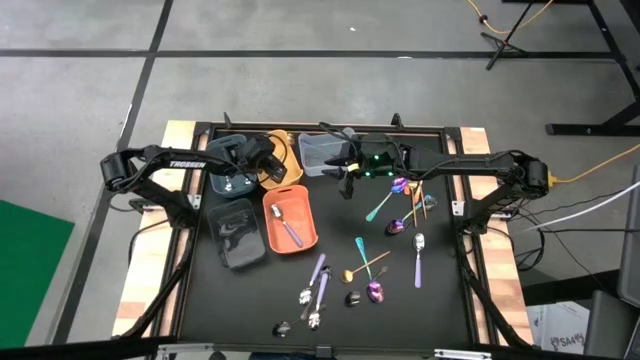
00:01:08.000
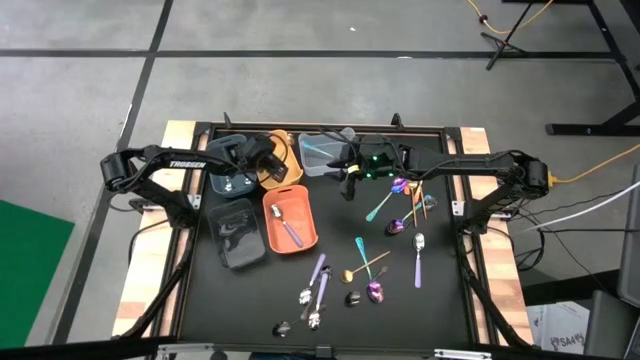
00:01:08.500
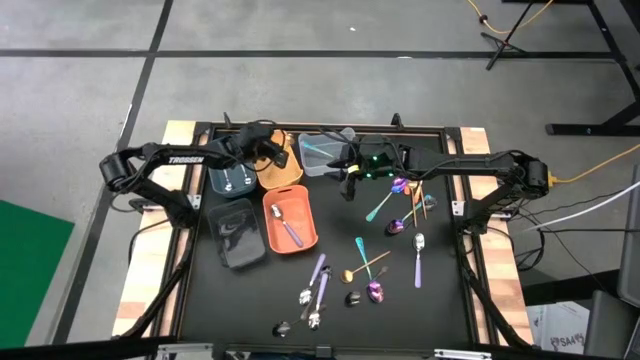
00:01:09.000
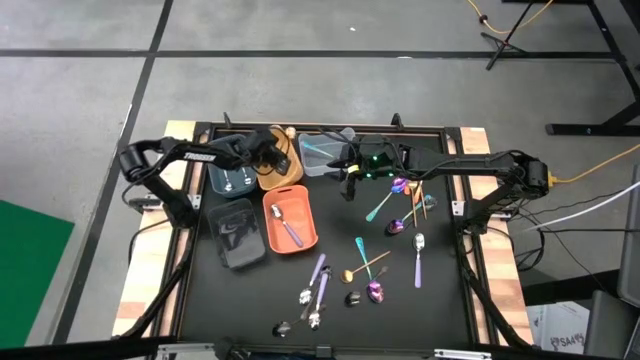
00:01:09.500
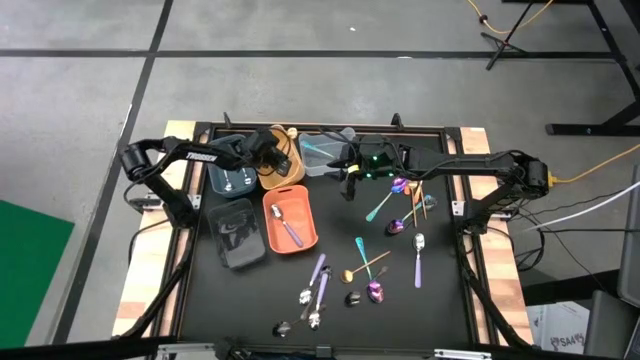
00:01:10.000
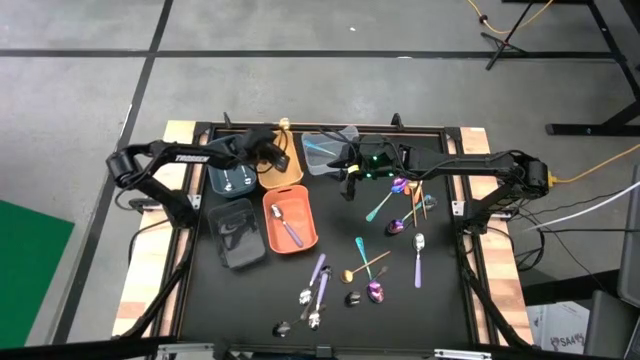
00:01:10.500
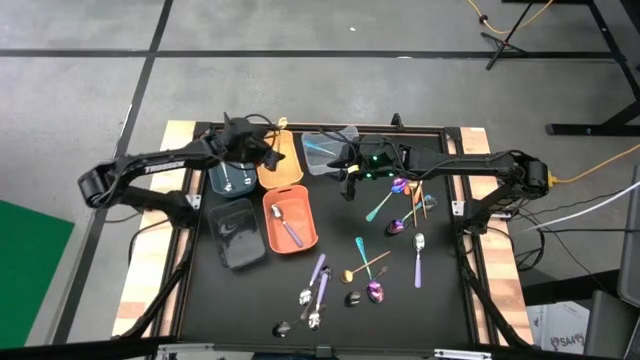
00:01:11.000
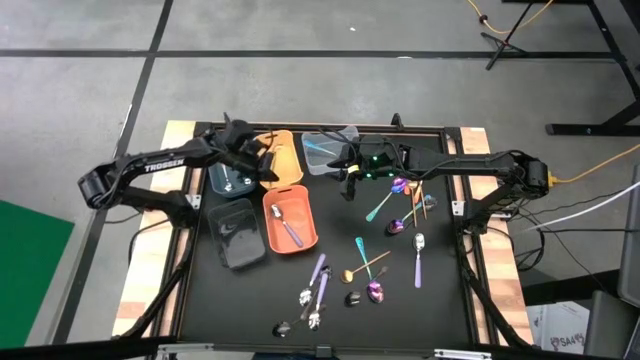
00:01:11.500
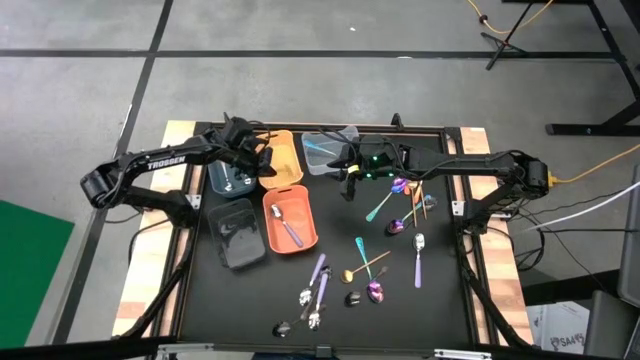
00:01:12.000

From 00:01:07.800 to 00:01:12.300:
Task: Sort silverware by color (type)
Put the gold spoon into the yellow bin

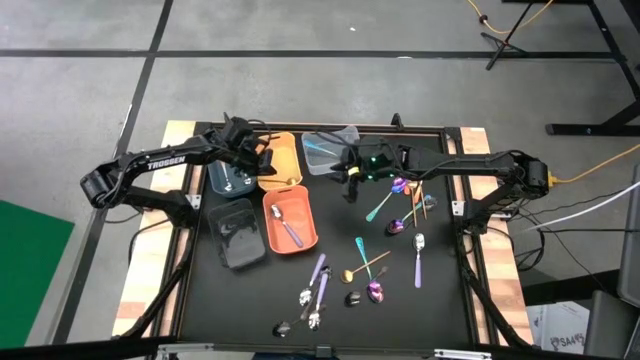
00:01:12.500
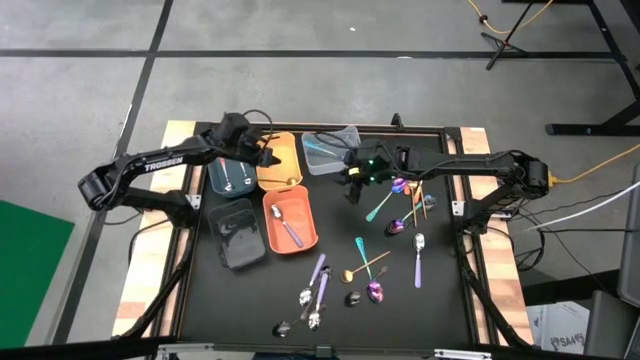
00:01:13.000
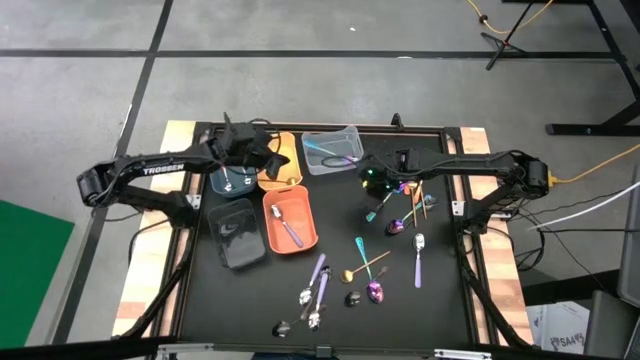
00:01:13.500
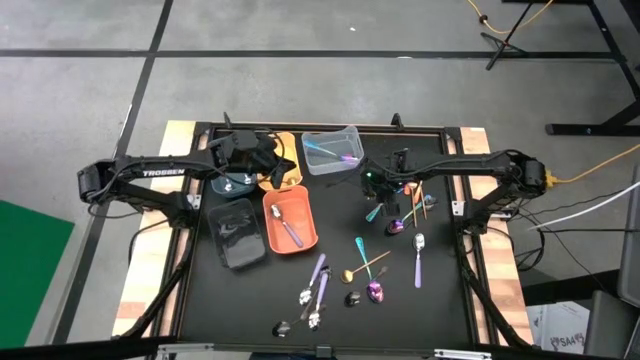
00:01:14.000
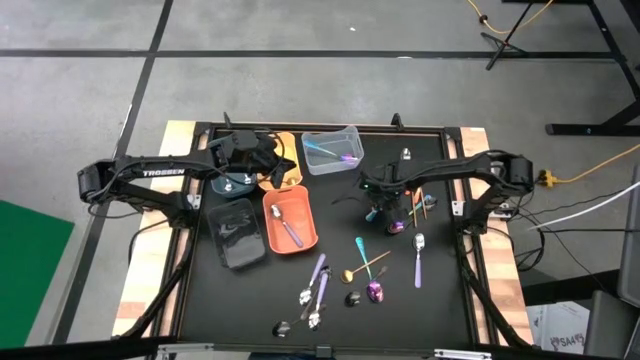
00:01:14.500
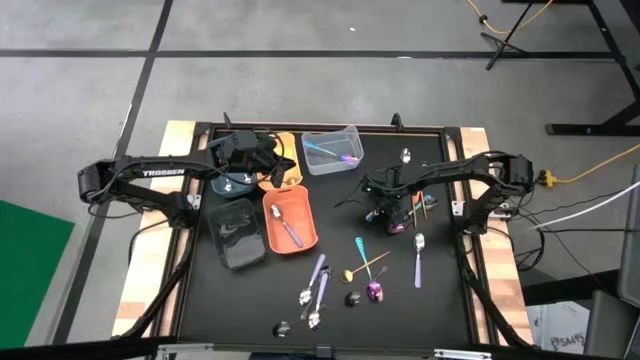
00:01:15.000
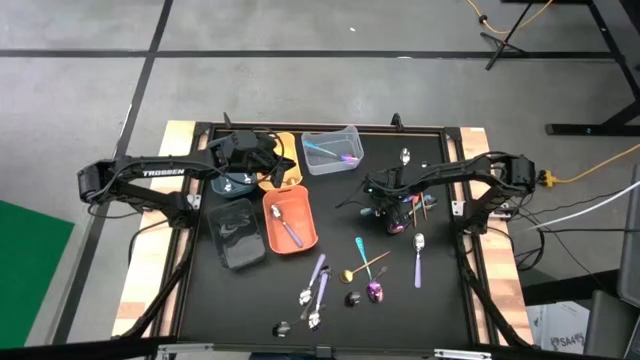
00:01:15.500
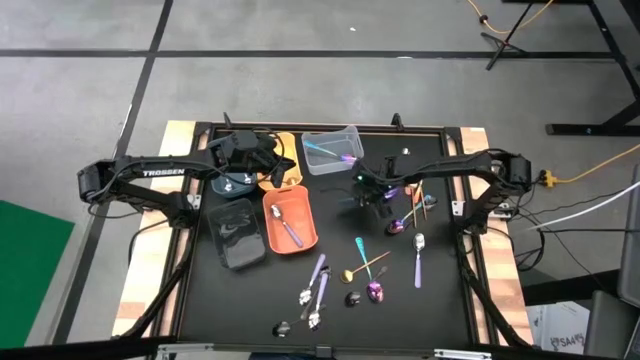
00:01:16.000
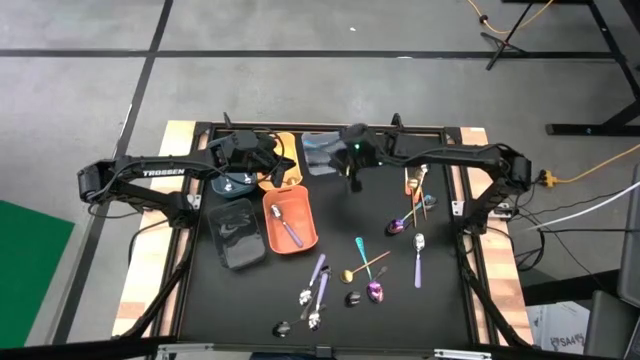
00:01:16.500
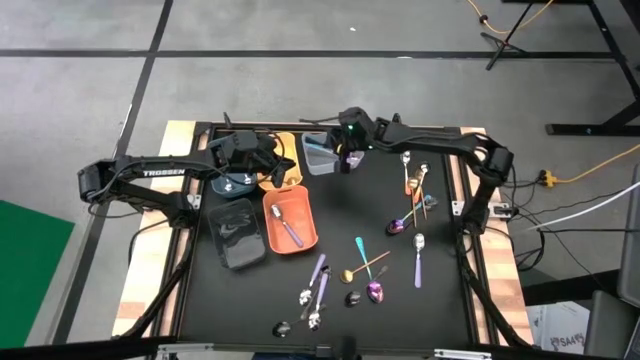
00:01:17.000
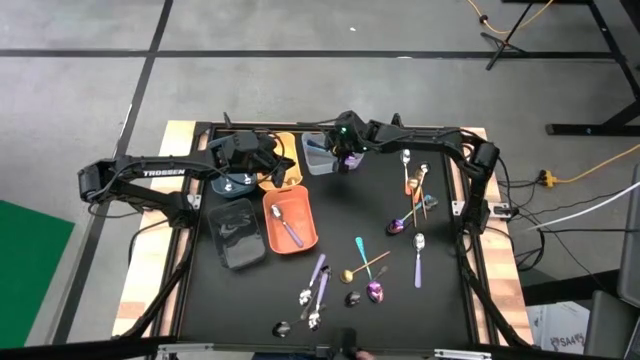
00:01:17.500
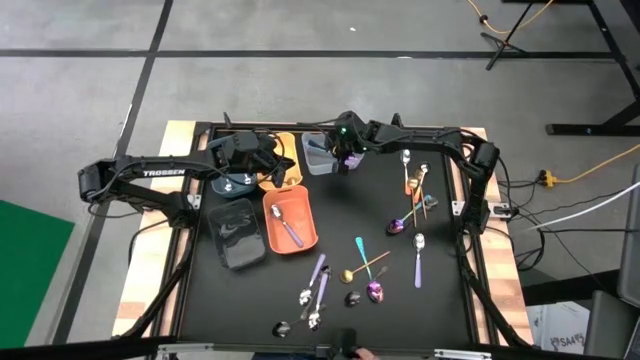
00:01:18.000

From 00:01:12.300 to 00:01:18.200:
Put the blue spoon into the transparent bin

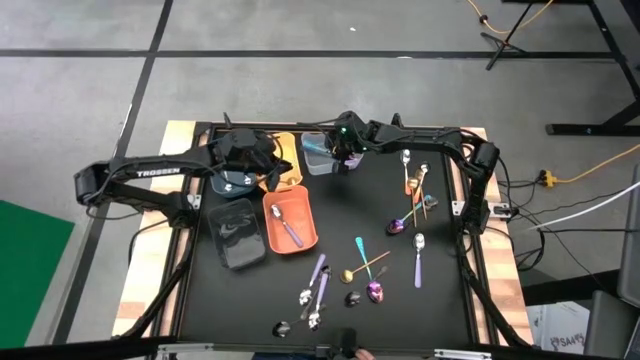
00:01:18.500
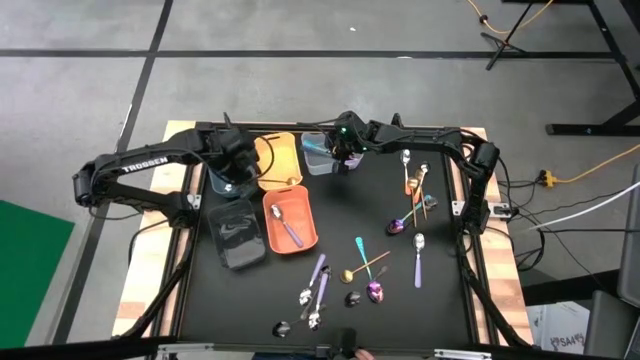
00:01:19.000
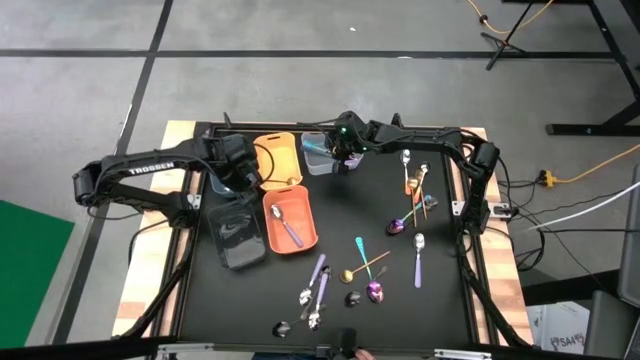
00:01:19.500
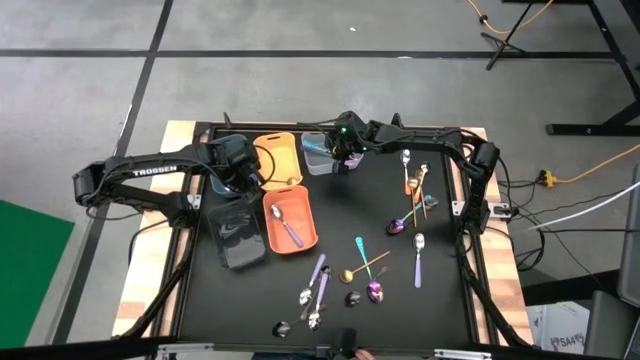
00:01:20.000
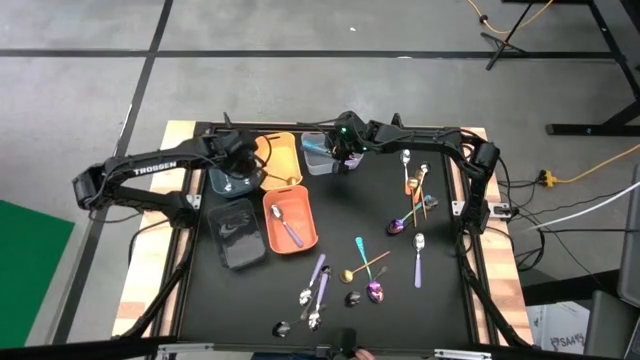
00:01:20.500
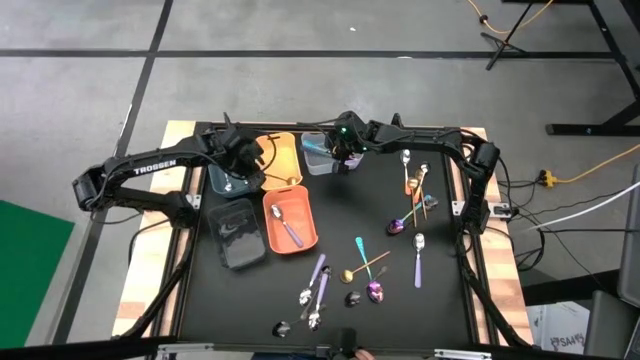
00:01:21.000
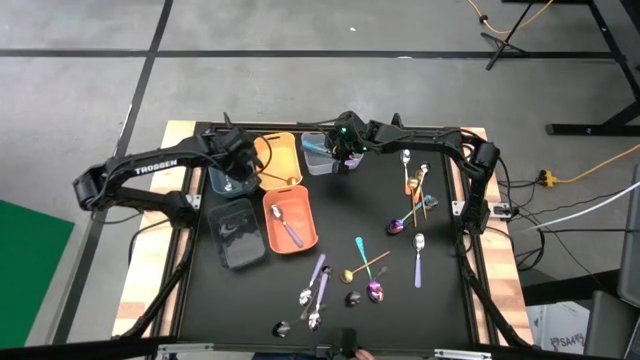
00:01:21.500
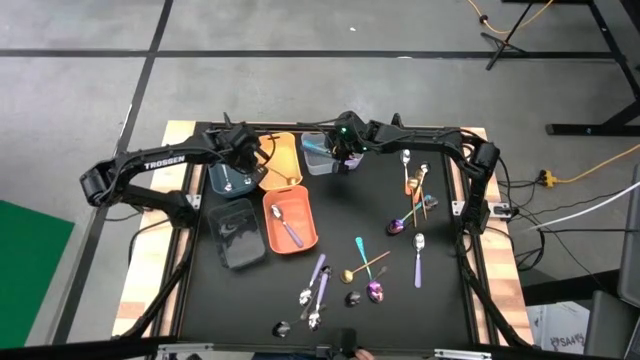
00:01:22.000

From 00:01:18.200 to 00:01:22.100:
Adjust the gold spoon in the yellow bin
